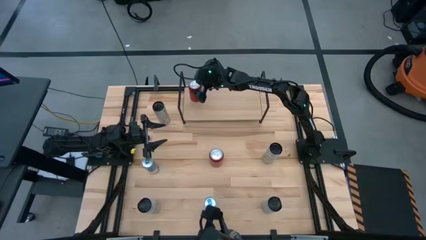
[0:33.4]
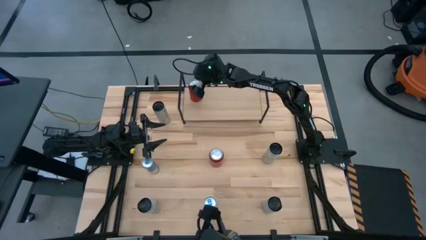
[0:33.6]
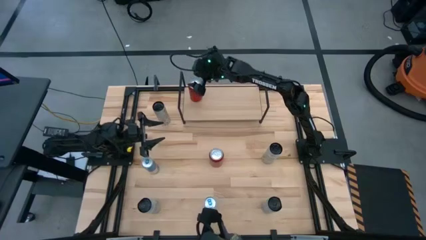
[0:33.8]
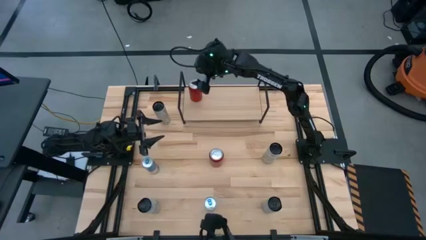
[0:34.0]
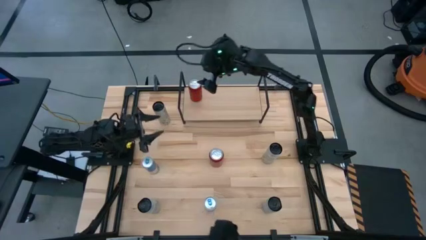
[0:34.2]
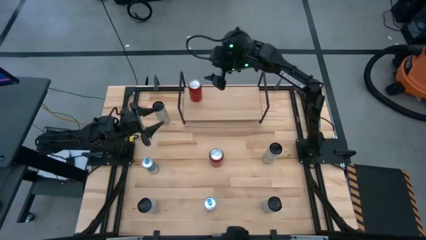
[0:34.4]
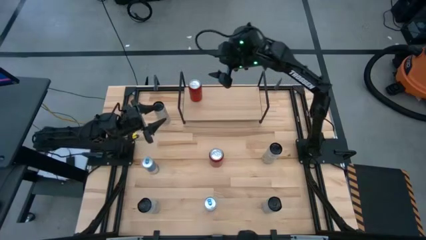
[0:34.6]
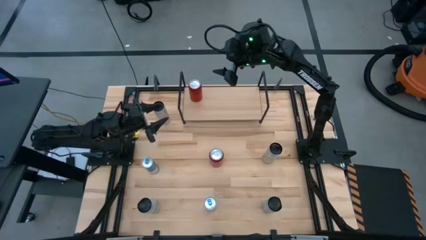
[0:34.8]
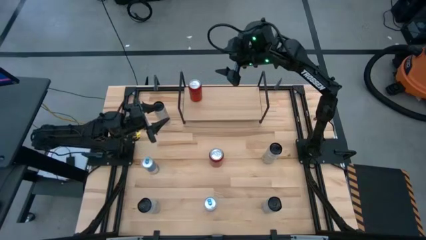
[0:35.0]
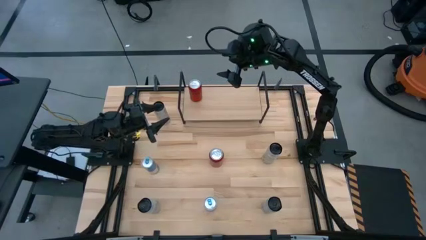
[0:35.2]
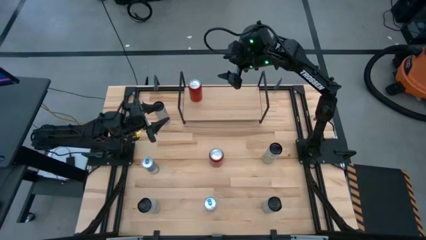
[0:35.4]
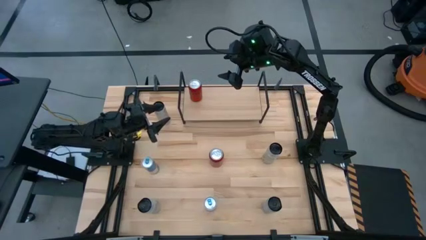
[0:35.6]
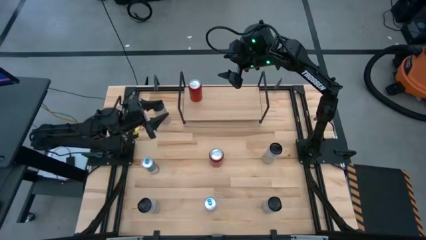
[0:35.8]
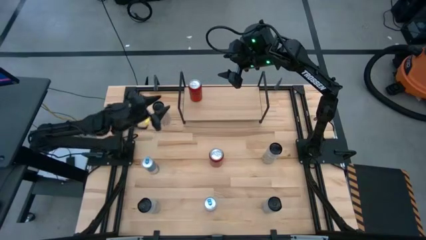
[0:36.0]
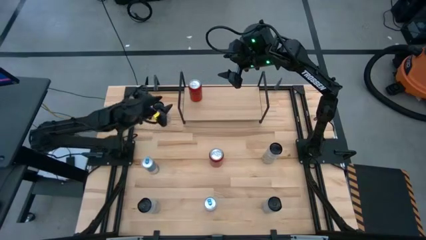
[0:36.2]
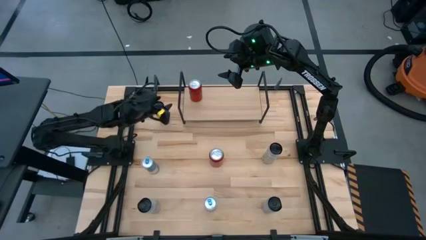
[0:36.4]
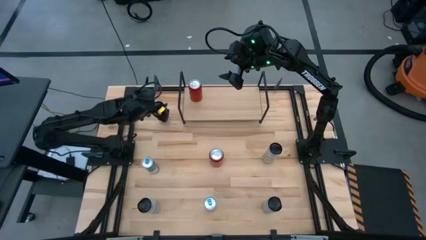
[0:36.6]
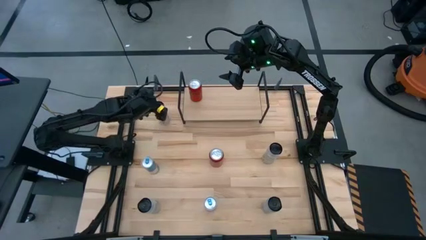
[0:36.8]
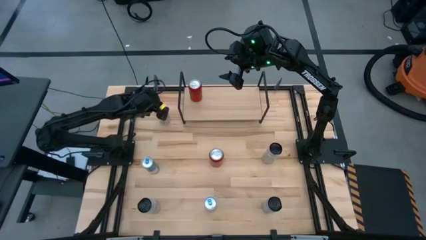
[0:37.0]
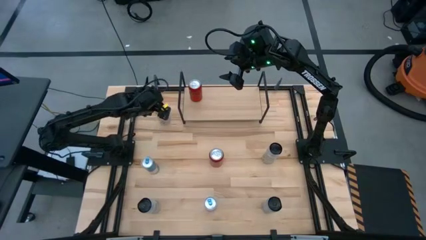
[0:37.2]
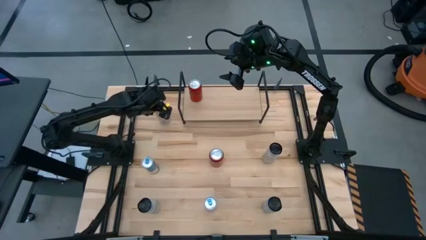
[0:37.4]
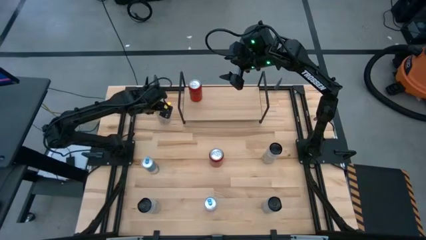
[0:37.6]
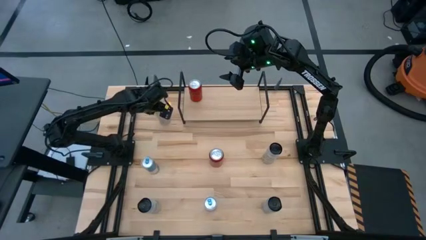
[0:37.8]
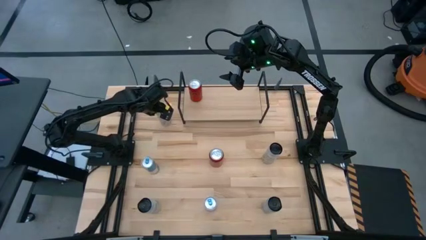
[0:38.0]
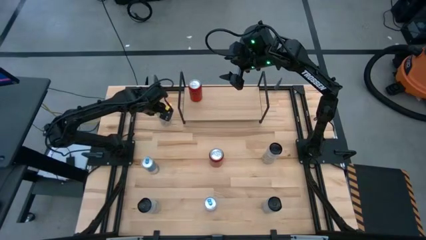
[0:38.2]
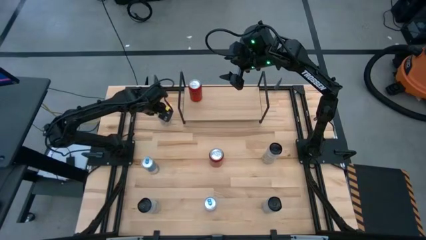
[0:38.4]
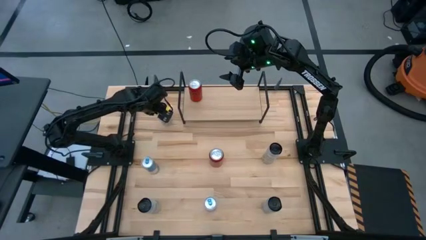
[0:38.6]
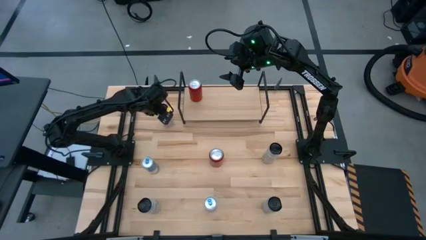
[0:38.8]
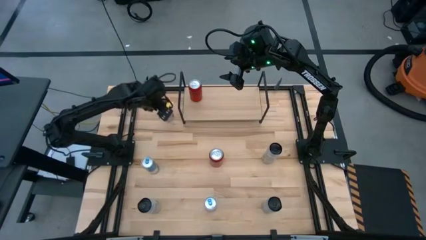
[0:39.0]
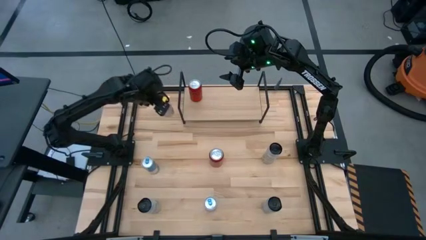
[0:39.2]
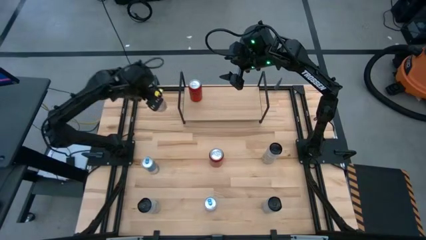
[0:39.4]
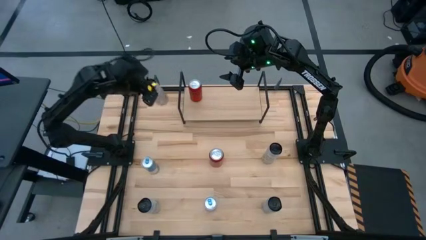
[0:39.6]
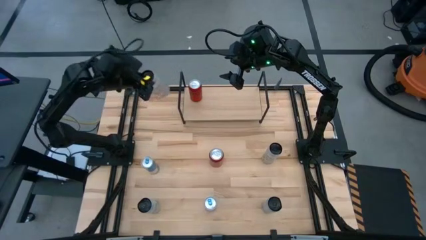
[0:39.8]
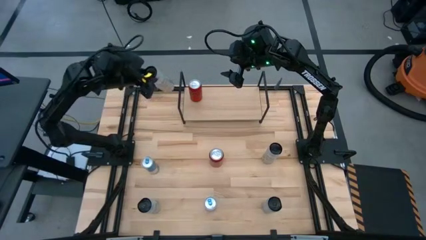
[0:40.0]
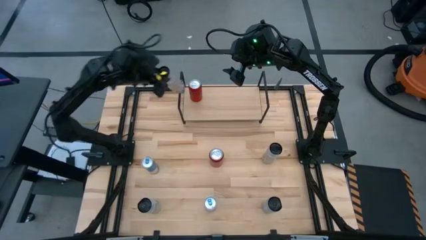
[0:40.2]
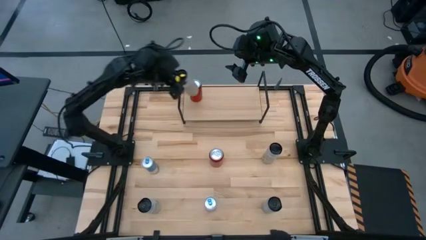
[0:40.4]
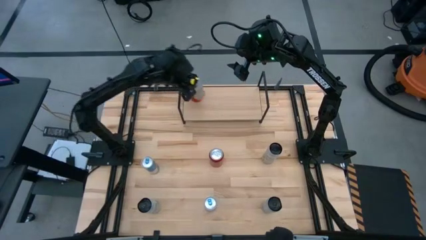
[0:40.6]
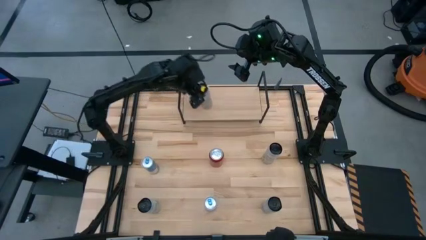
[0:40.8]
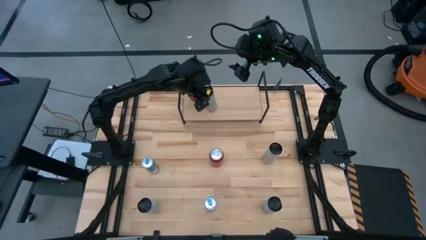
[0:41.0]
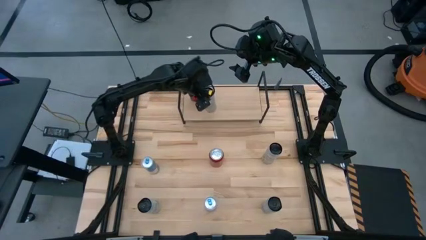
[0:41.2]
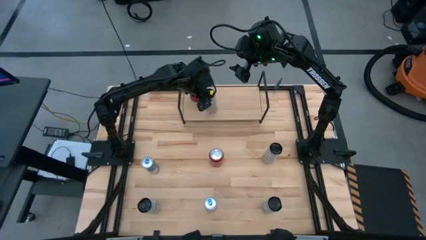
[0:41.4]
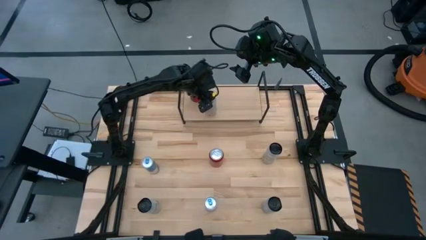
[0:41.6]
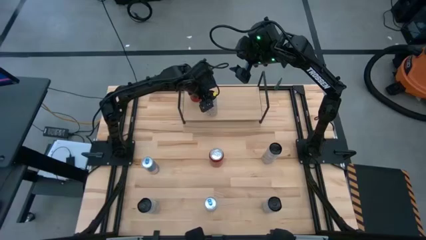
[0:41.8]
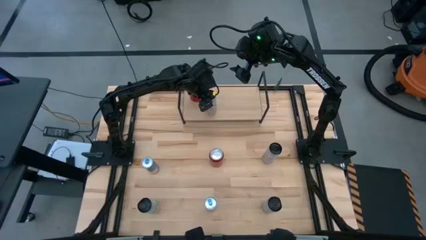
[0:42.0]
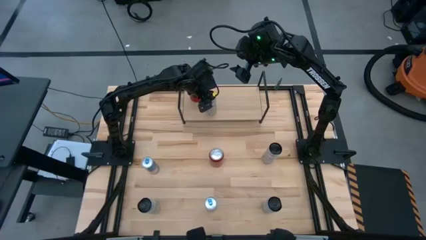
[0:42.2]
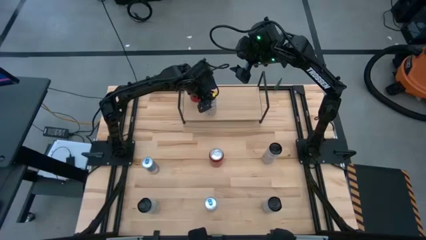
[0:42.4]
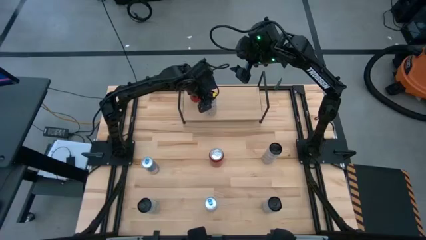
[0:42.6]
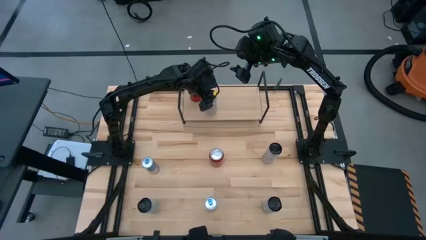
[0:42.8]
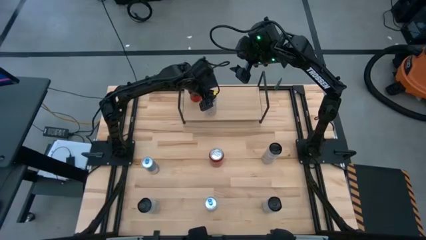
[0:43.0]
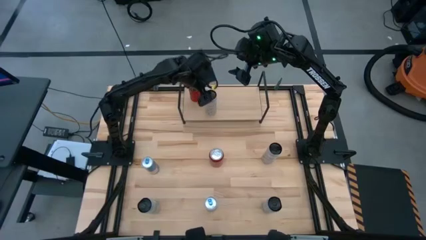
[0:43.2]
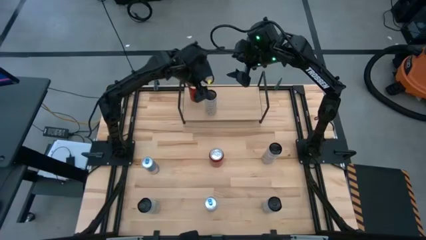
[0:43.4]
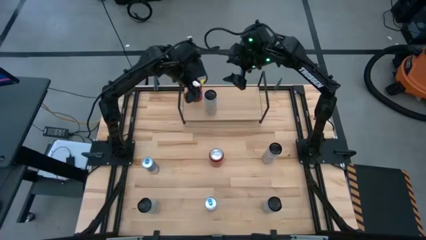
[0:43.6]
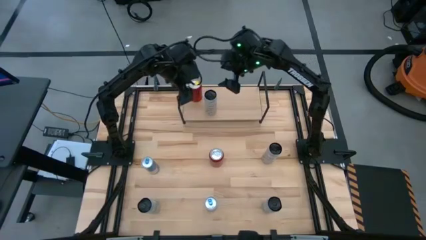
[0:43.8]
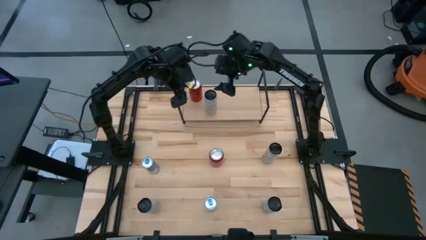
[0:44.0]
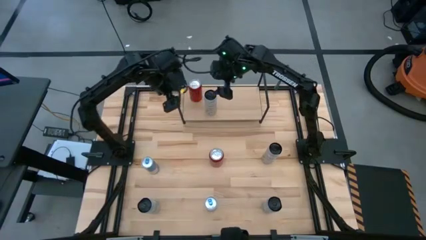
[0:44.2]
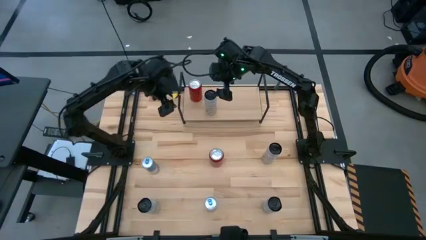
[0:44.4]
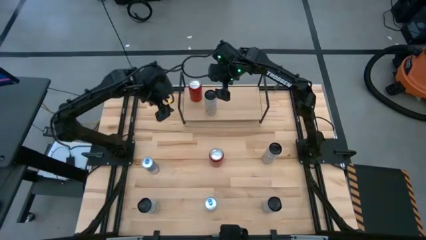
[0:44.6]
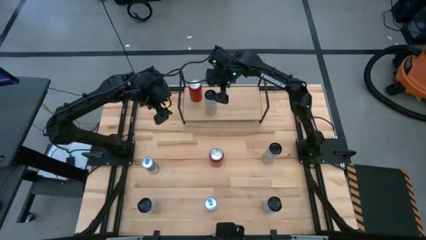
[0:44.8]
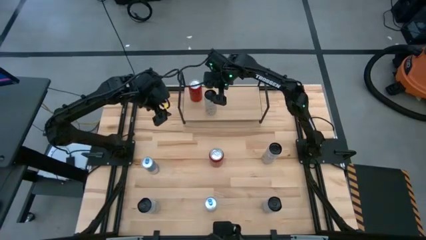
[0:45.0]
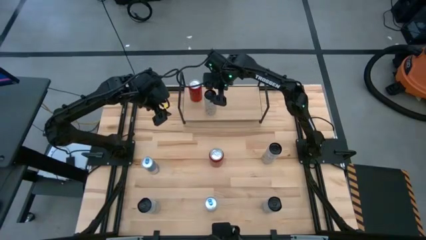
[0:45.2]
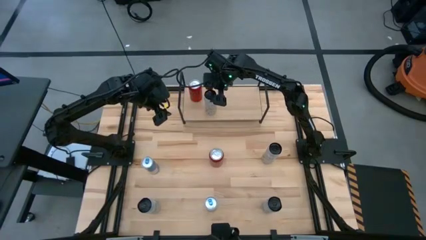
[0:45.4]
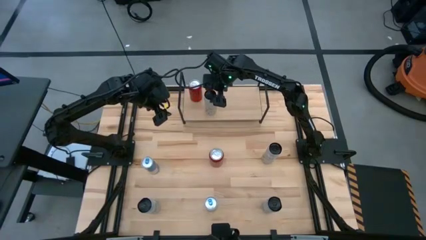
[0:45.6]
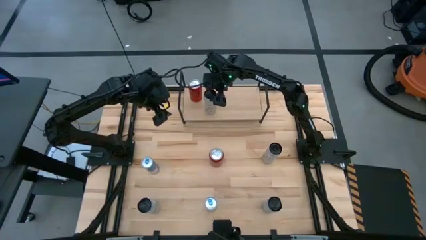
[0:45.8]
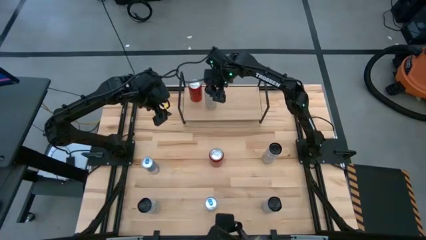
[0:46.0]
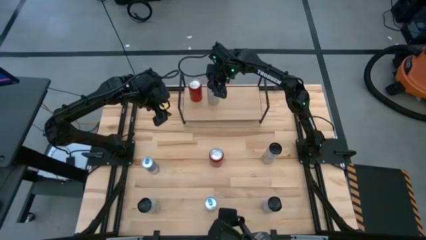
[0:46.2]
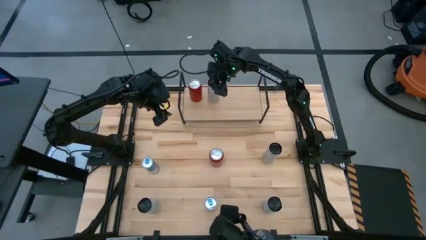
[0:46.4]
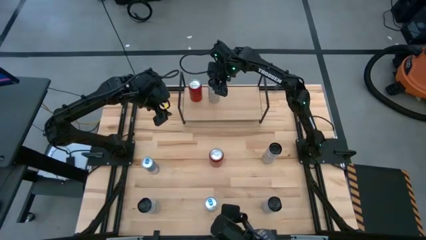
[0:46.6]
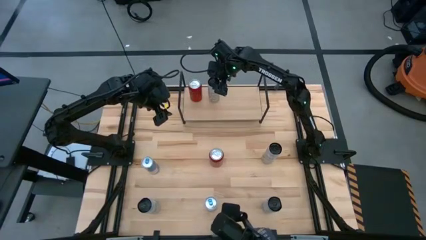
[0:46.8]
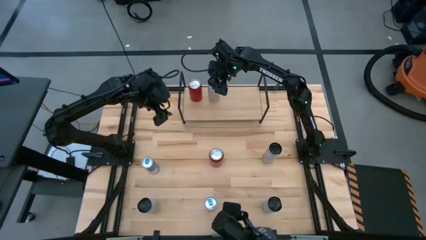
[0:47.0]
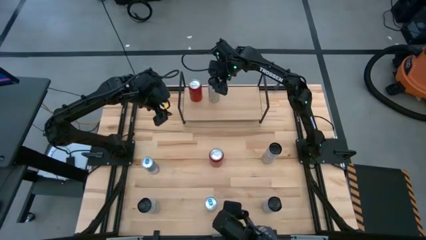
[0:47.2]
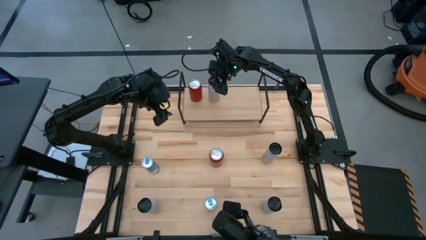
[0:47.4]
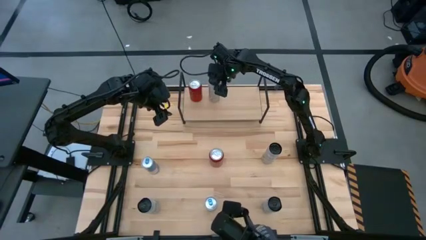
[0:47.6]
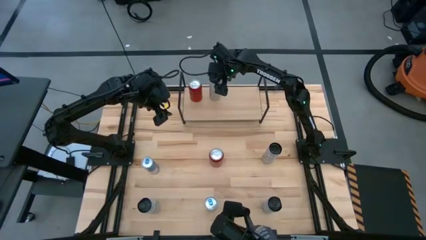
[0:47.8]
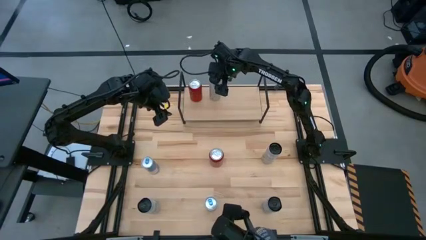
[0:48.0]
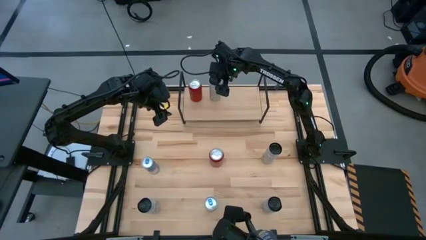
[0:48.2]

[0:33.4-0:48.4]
Task: Place canned beverage on shelf
Put the left white yellow soda can on the shelf
